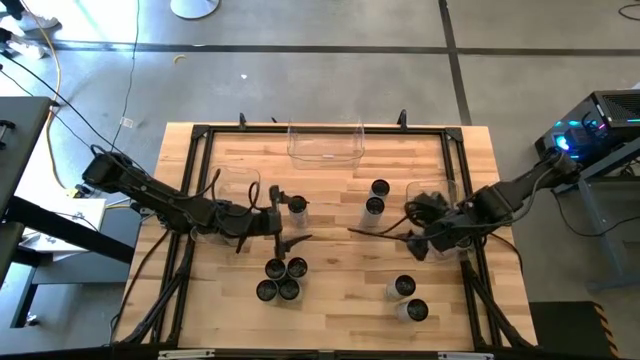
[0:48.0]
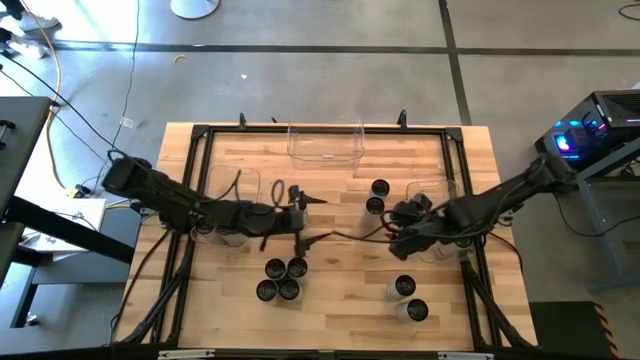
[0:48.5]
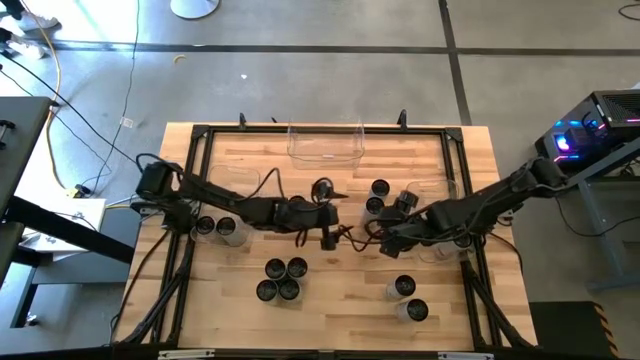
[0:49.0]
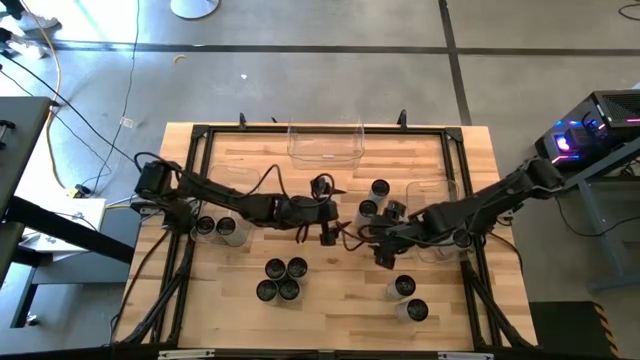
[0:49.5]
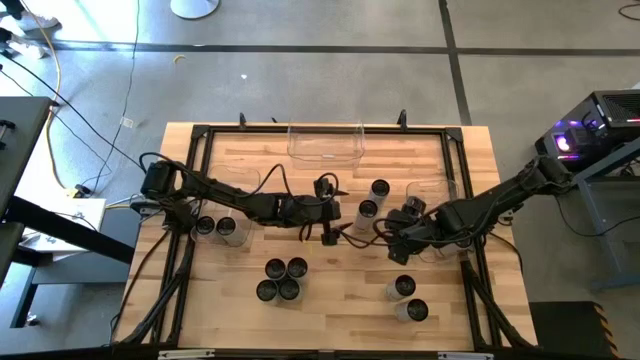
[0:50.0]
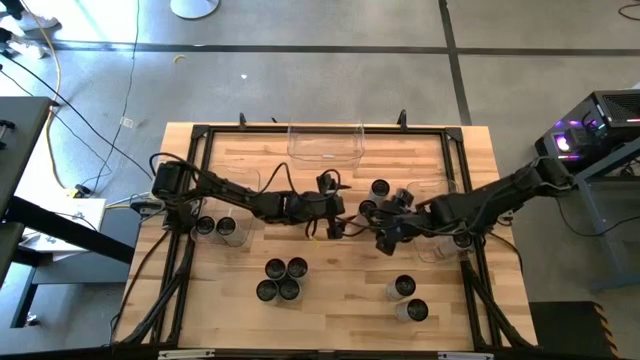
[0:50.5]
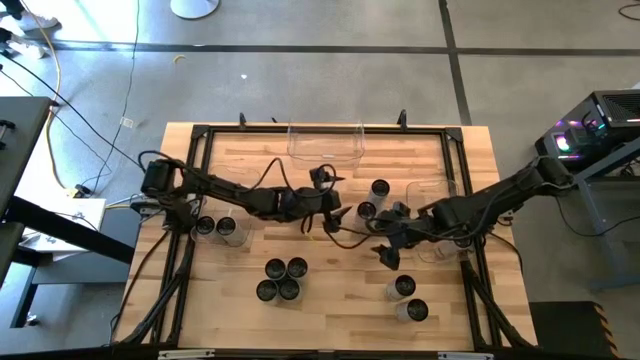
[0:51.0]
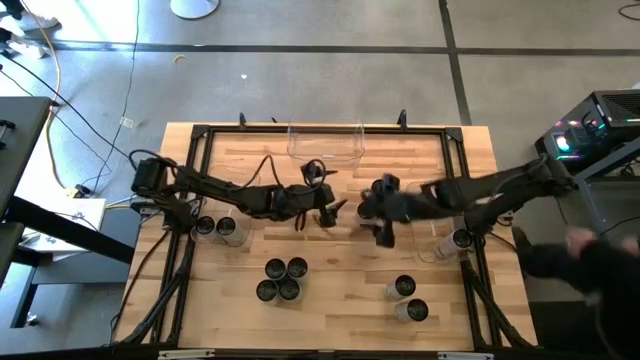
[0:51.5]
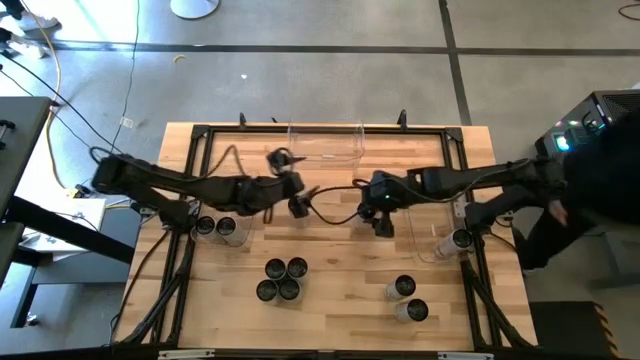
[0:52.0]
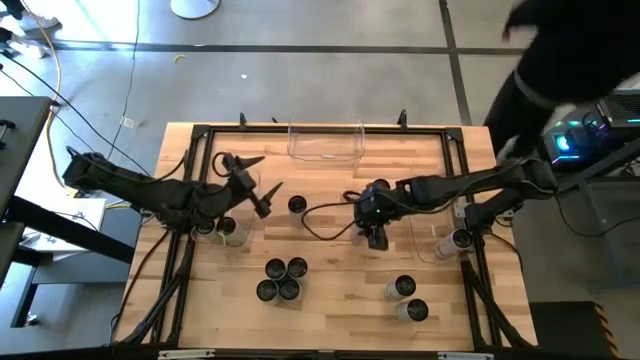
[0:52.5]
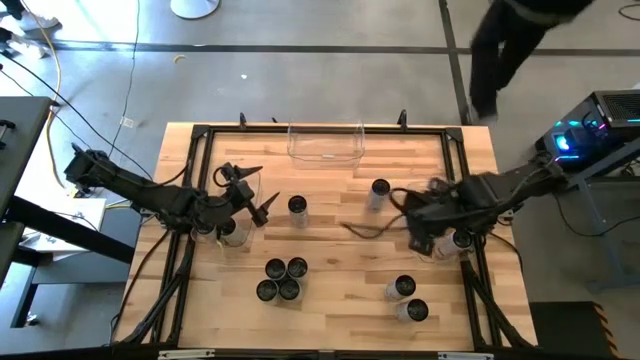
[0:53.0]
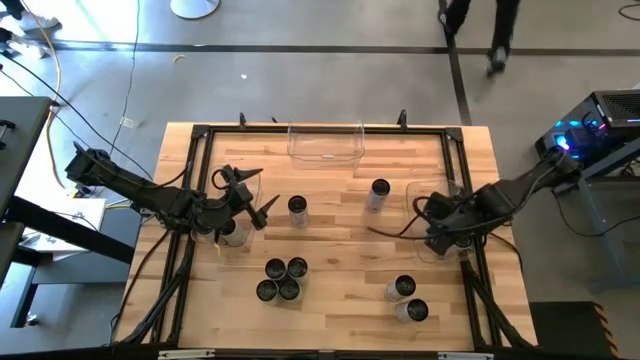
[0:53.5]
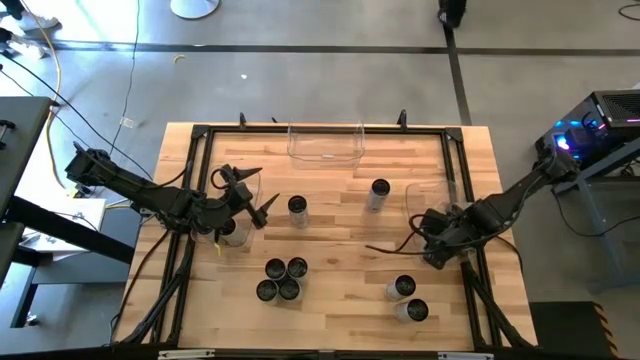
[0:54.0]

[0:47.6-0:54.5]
Task: Sort soda cans
Put the white-pink soda can into the right transparent bin

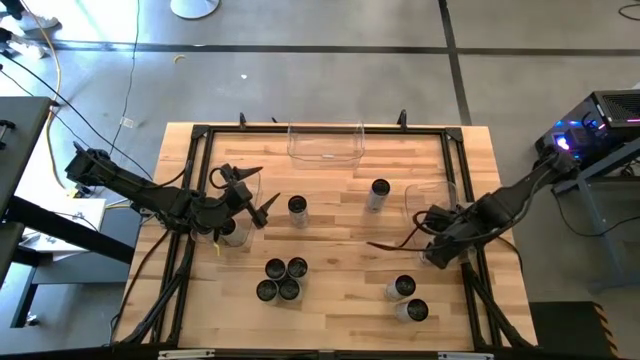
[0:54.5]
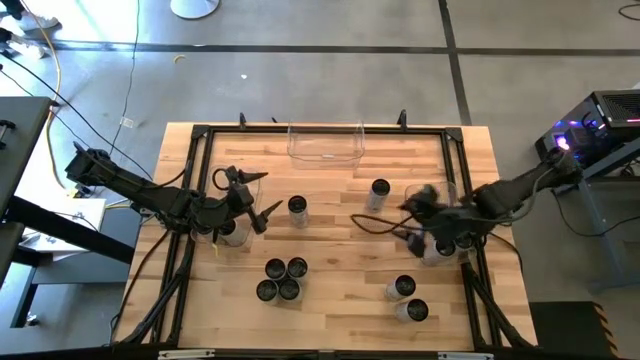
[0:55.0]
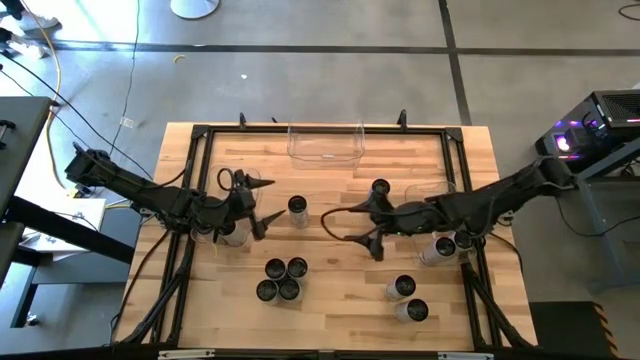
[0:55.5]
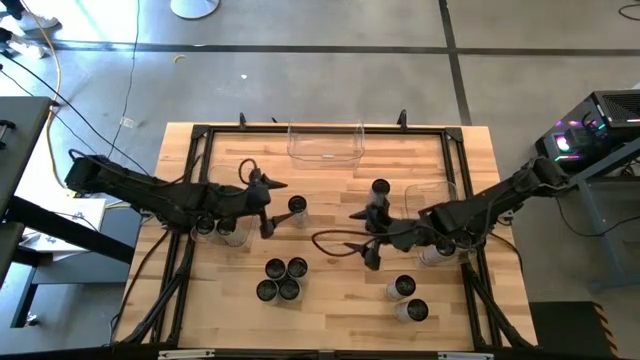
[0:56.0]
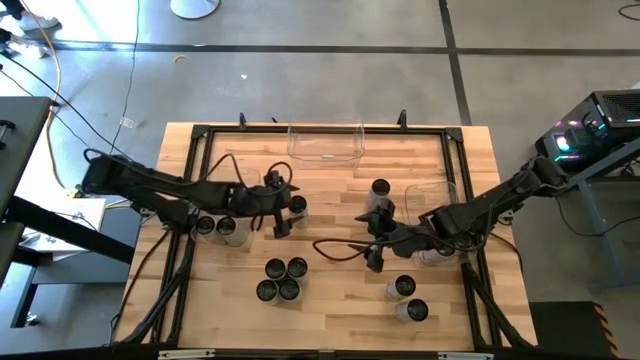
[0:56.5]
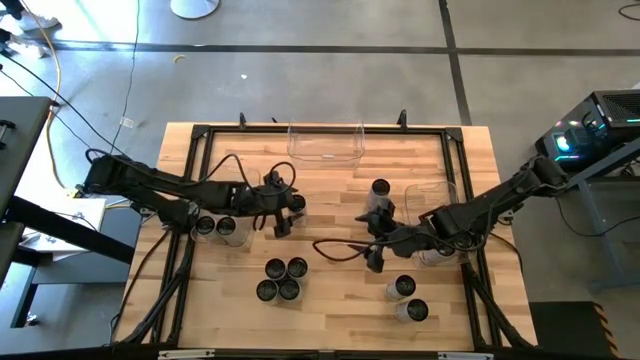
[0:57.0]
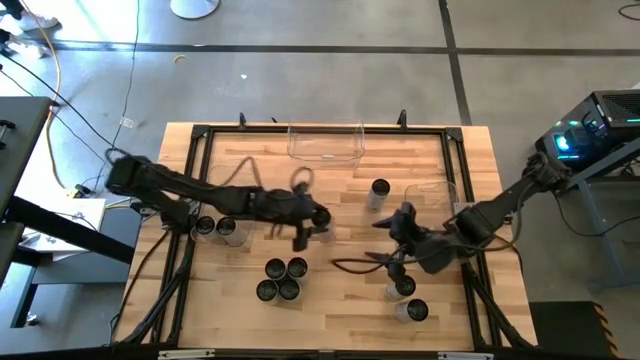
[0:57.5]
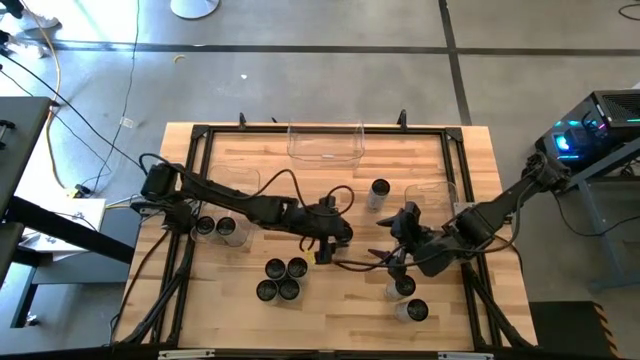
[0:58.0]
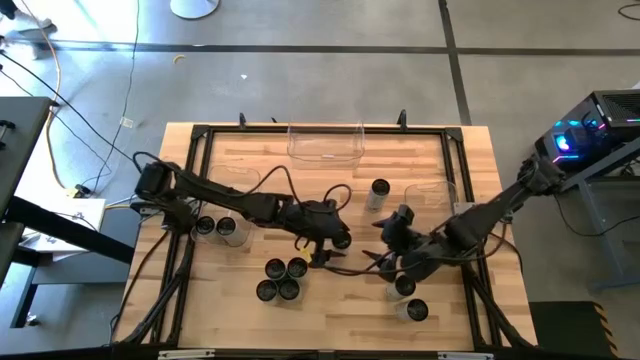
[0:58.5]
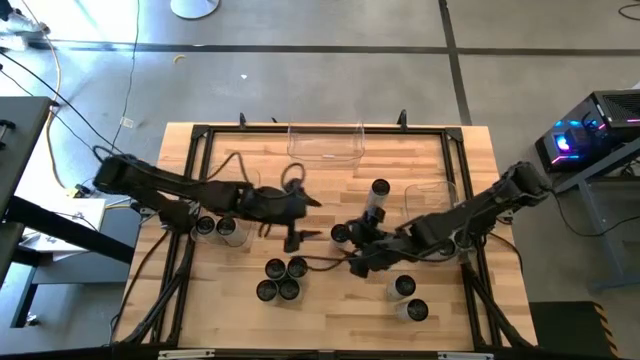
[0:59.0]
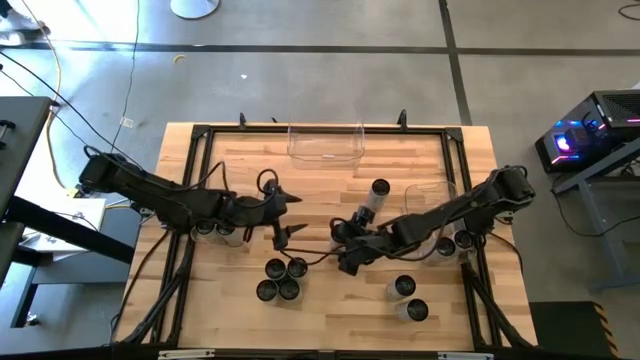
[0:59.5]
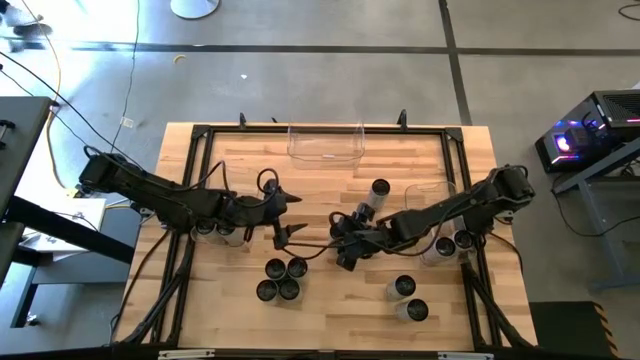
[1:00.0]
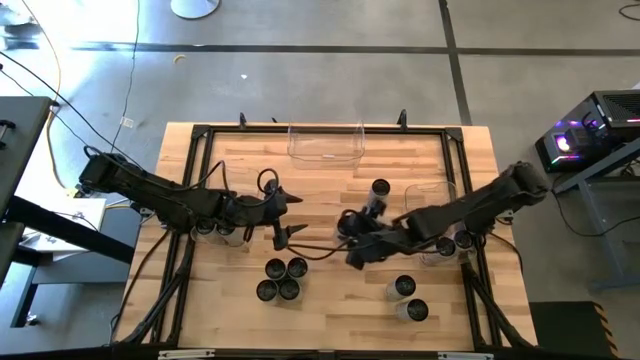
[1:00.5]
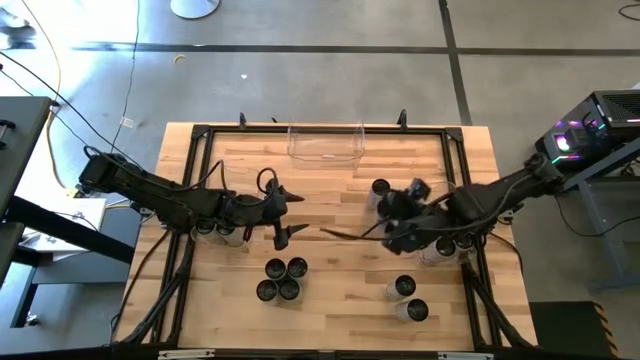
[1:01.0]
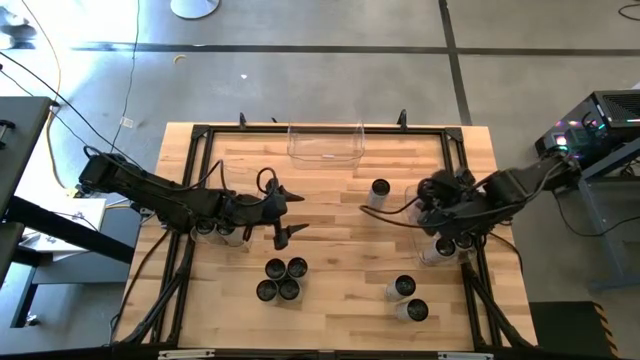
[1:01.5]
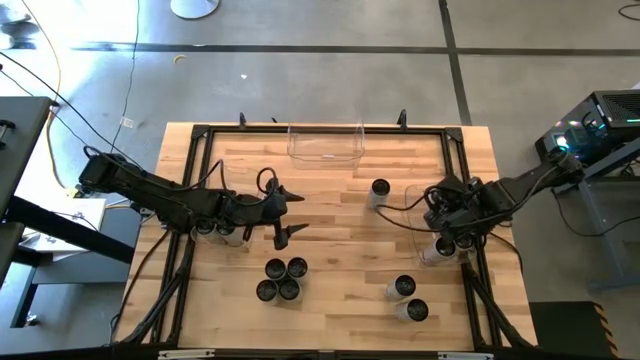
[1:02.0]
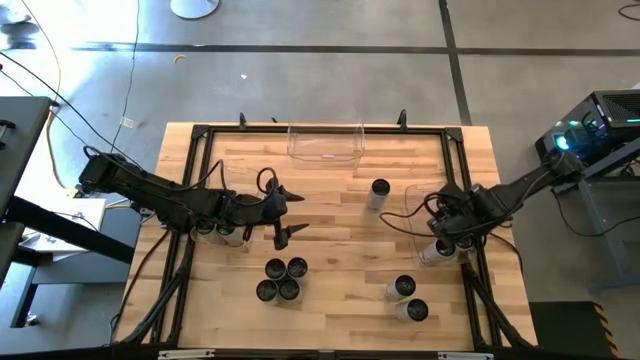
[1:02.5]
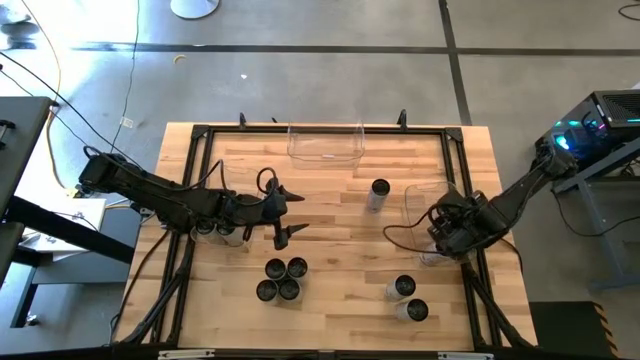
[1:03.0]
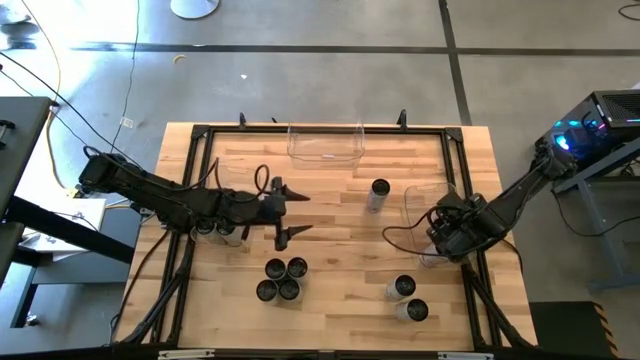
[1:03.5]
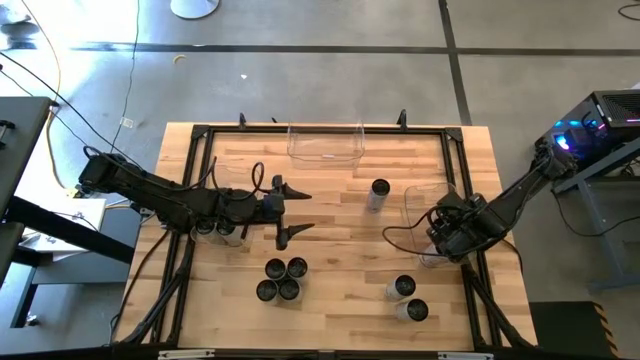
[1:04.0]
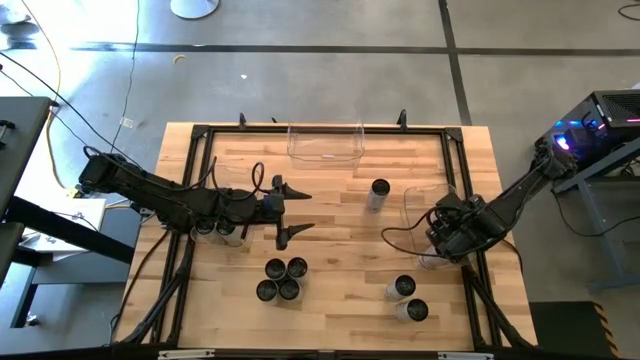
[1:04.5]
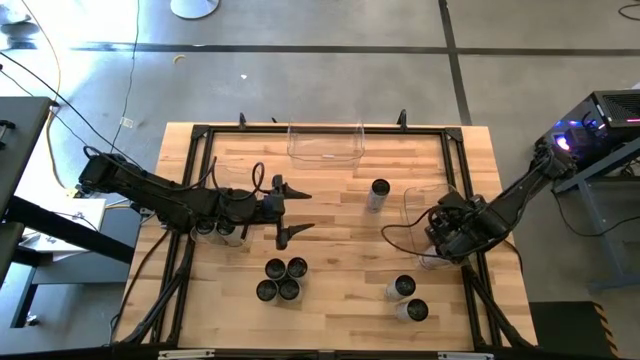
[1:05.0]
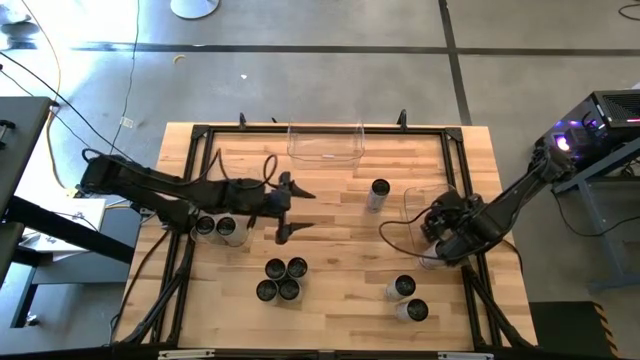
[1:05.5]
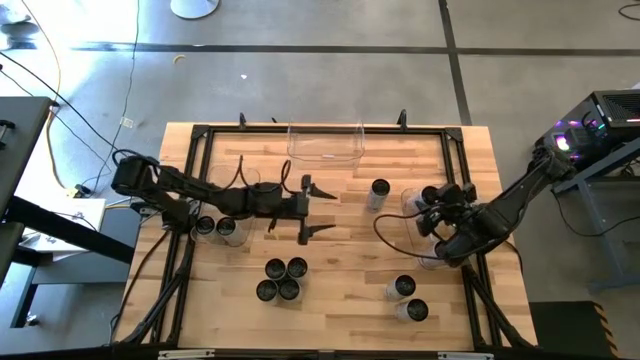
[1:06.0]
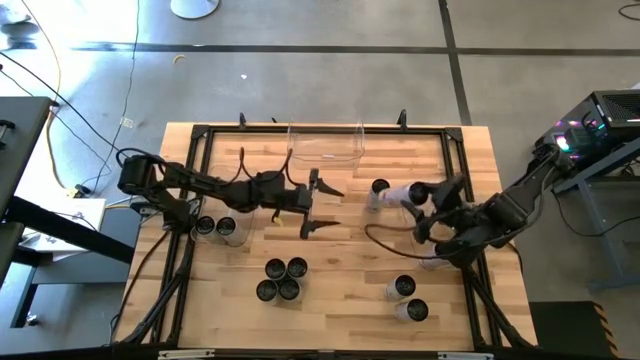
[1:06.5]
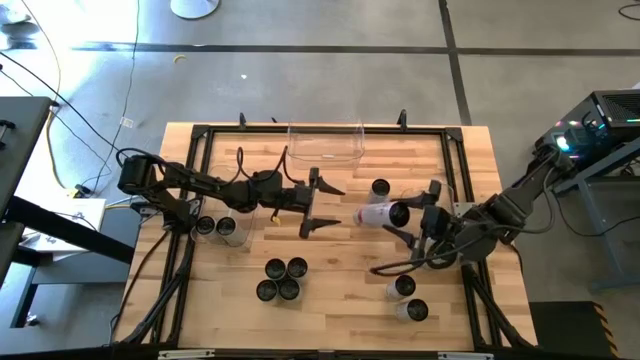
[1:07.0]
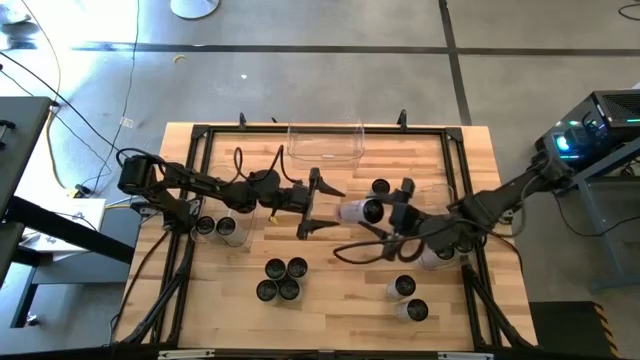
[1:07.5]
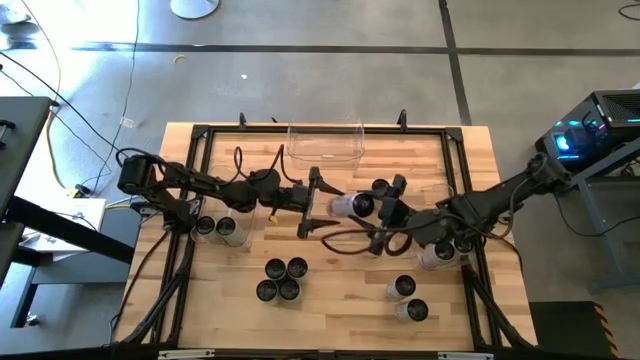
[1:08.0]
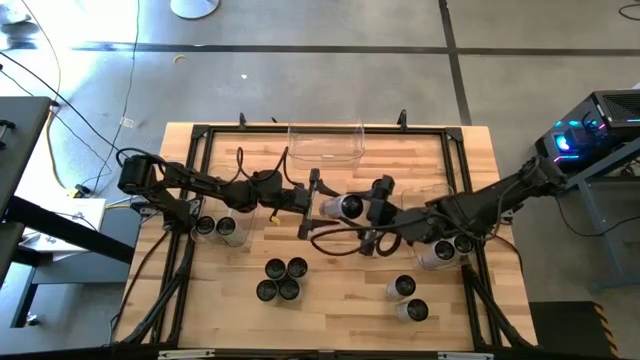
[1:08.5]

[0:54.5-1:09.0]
Put the white-pink soda can into the right transparent bin
